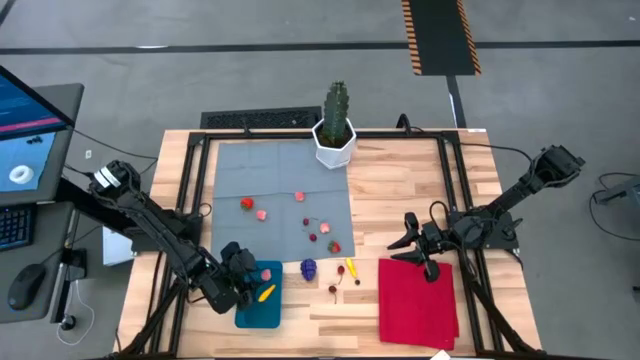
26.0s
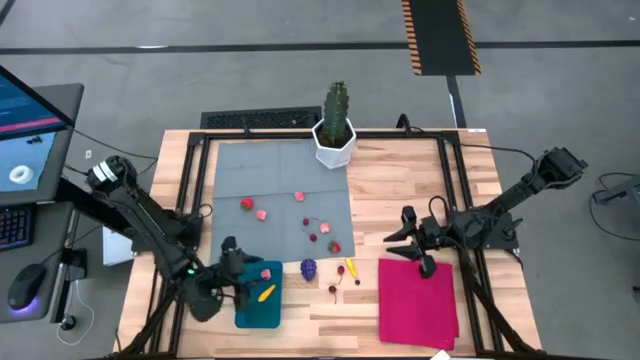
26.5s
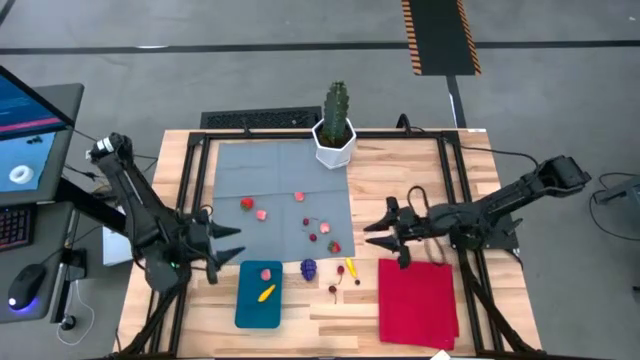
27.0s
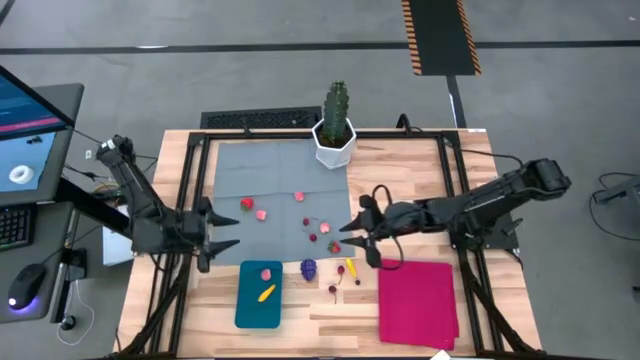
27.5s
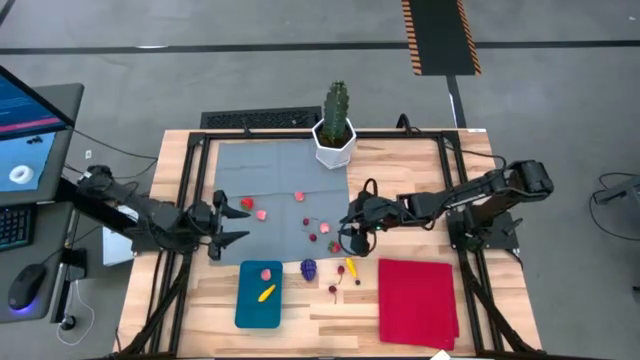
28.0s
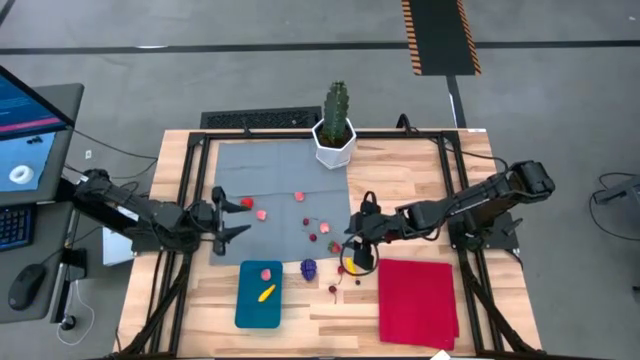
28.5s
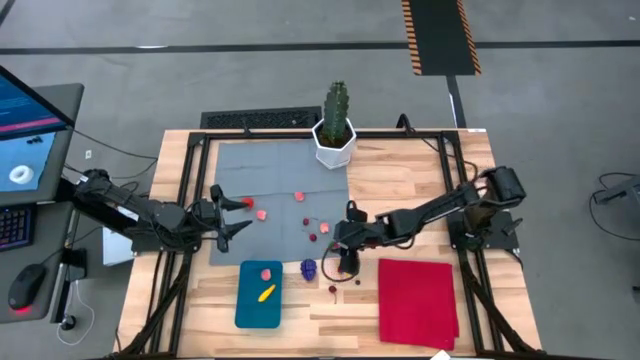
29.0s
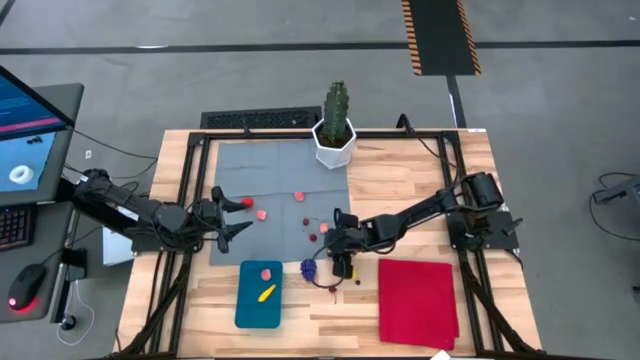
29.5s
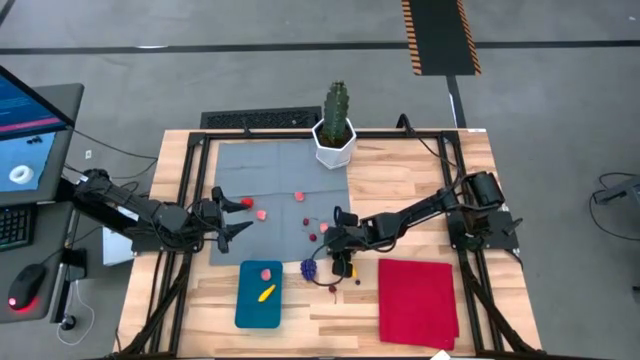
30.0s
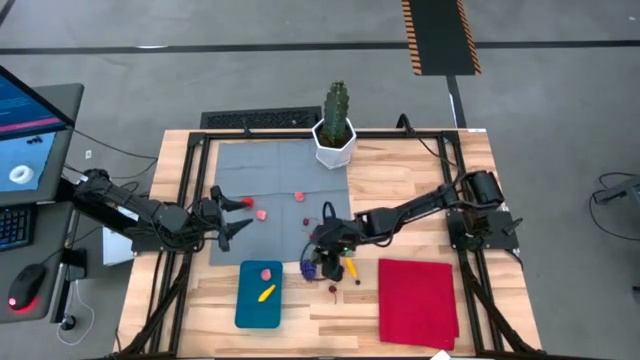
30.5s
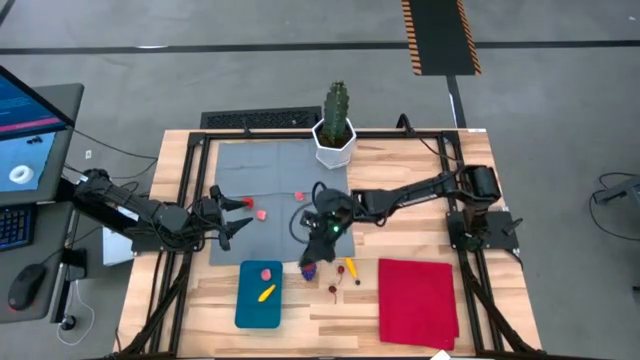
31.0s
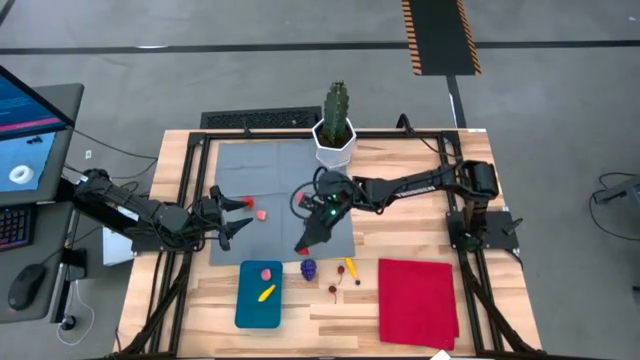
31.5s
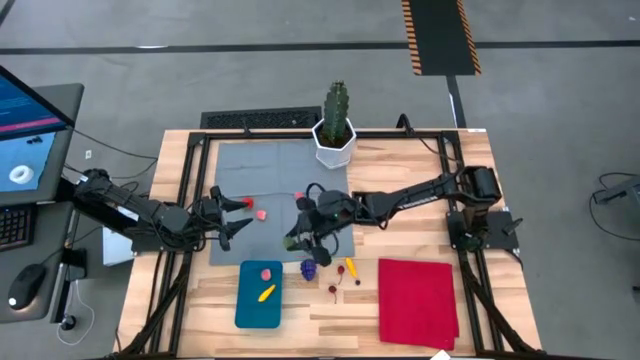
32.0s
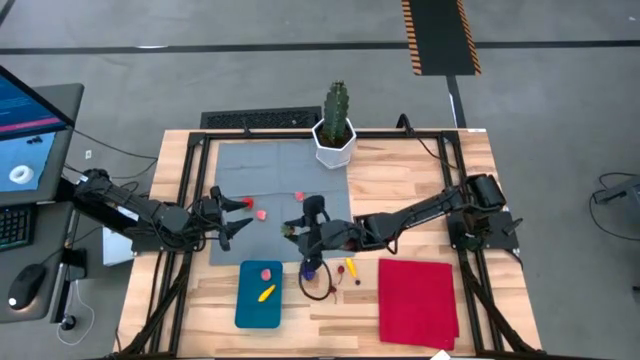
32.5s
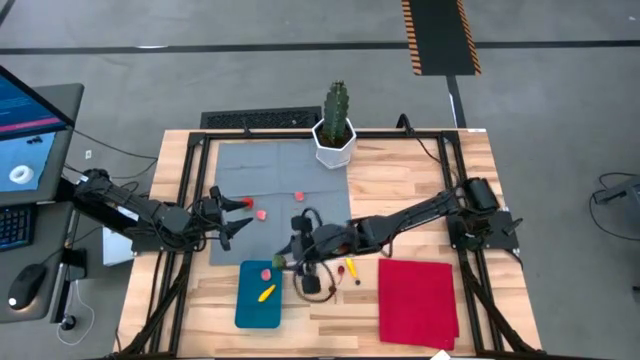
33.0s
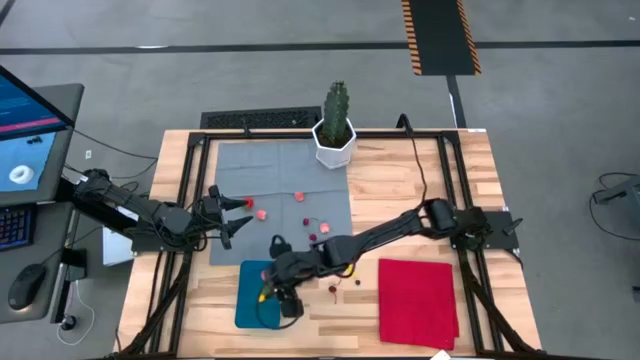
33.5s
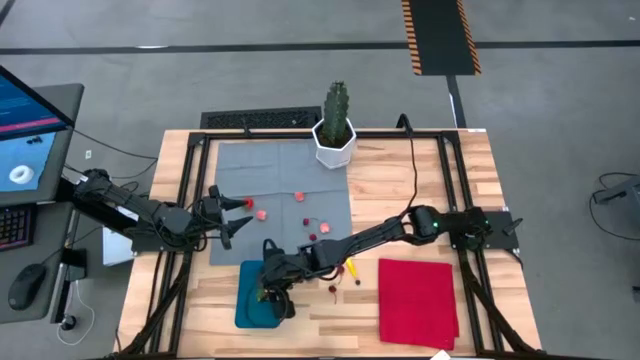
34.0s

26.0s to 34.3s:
Task: Pick and placing Produce into tupperware
Put the strawberry into the blue bin

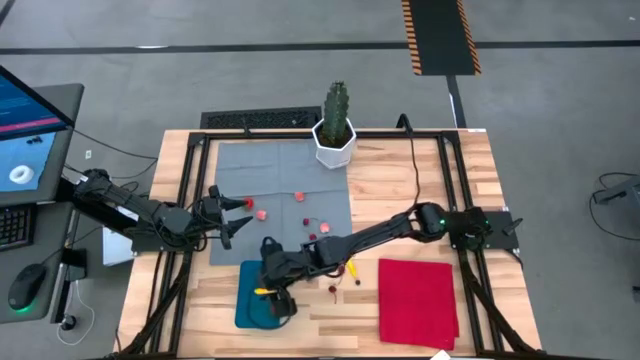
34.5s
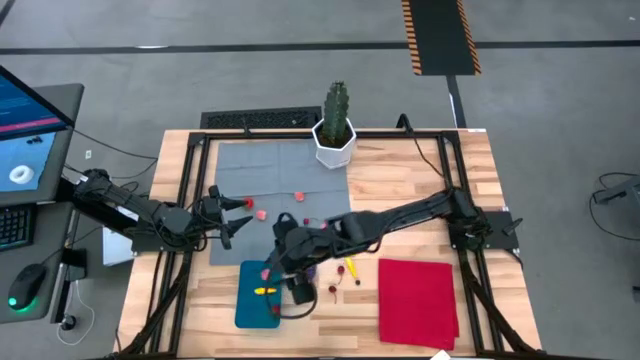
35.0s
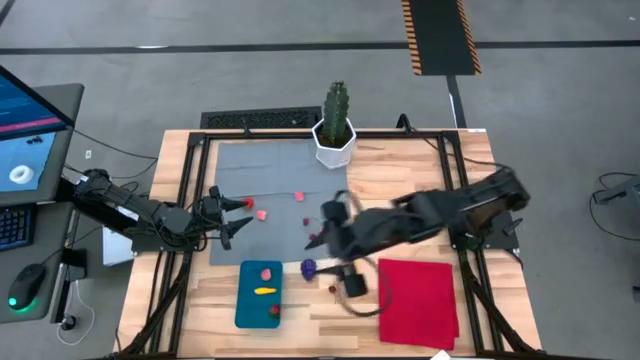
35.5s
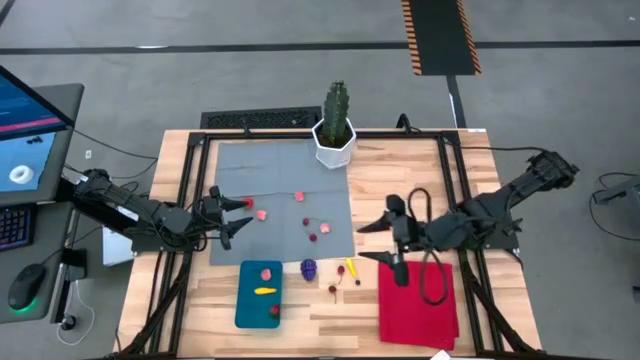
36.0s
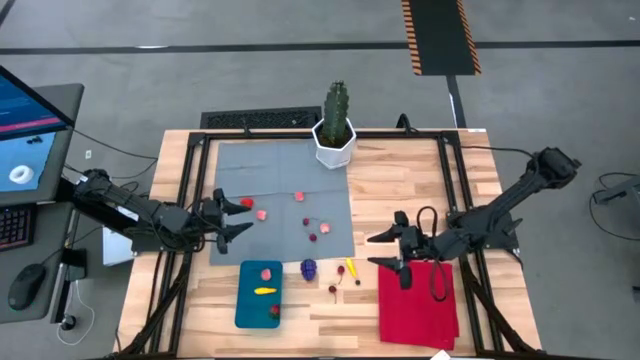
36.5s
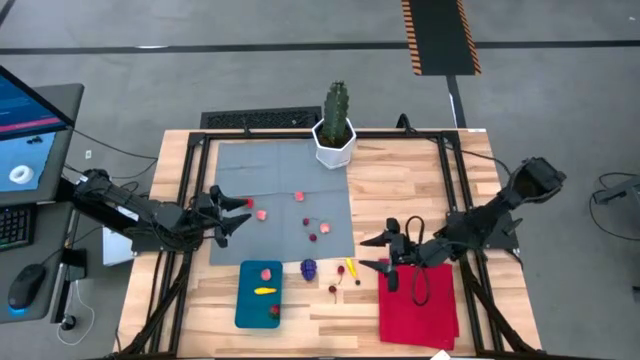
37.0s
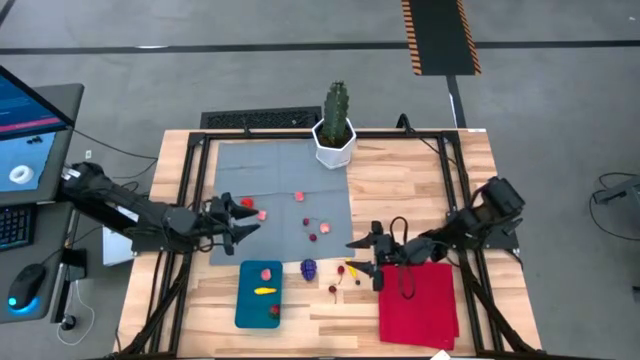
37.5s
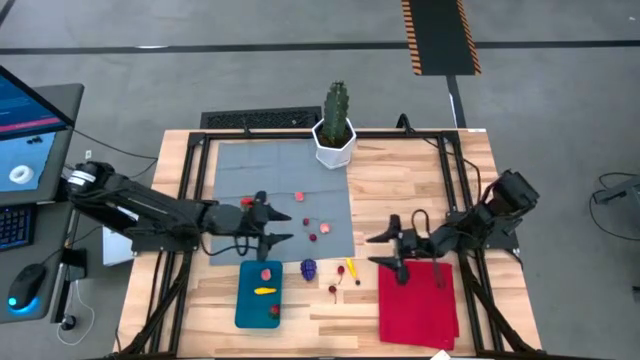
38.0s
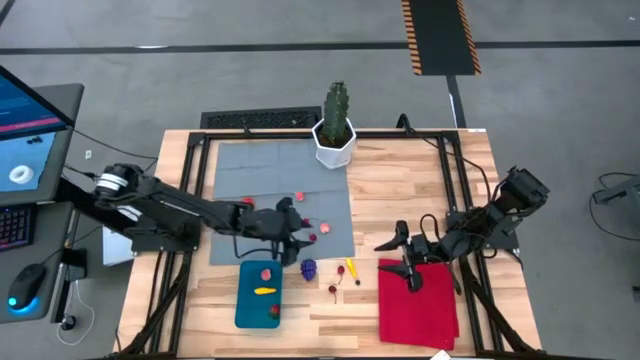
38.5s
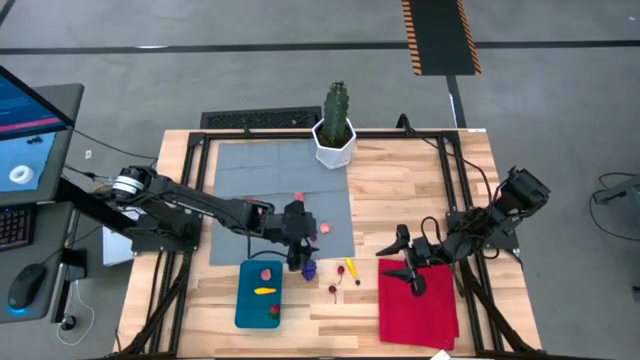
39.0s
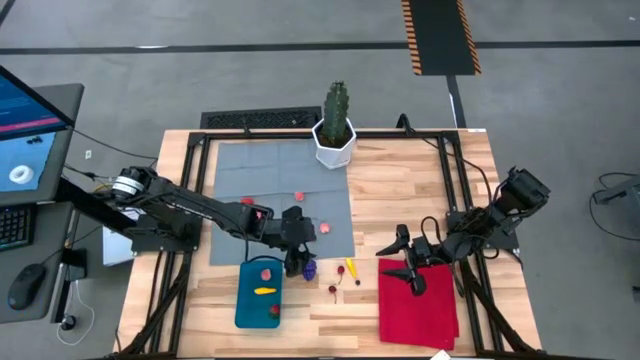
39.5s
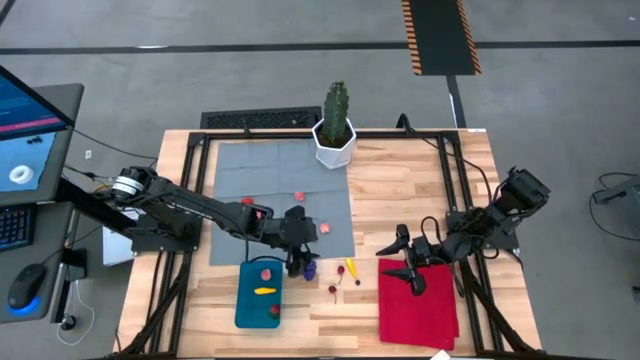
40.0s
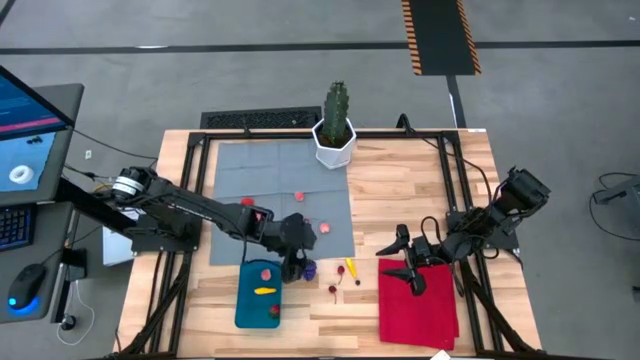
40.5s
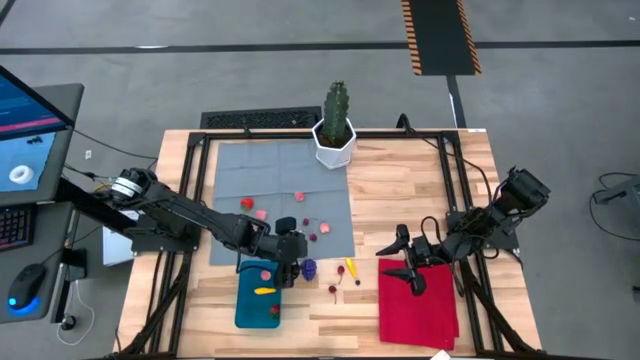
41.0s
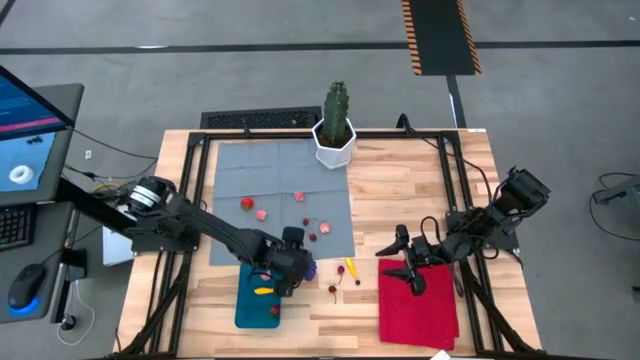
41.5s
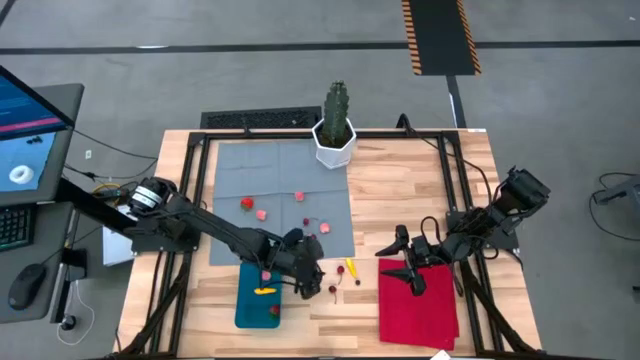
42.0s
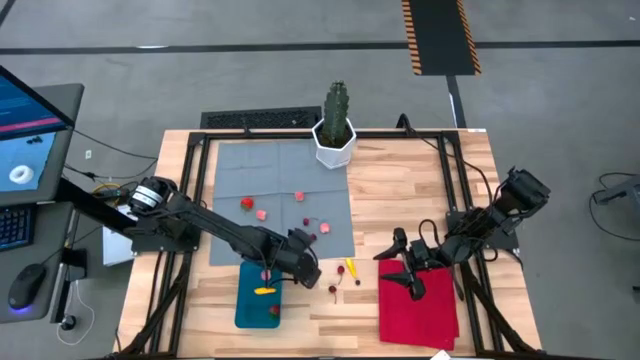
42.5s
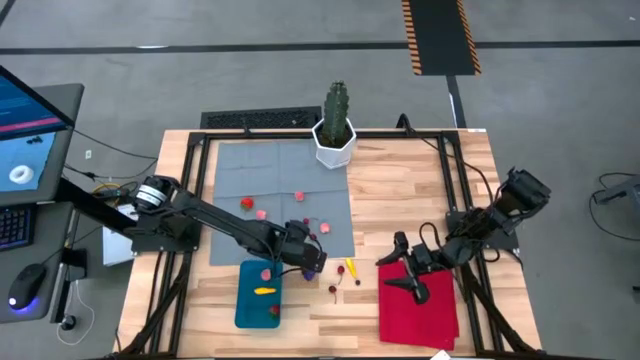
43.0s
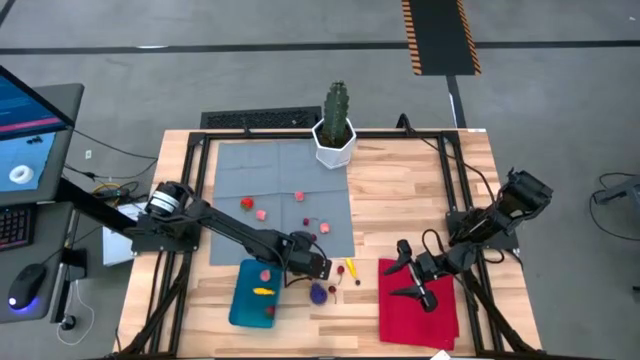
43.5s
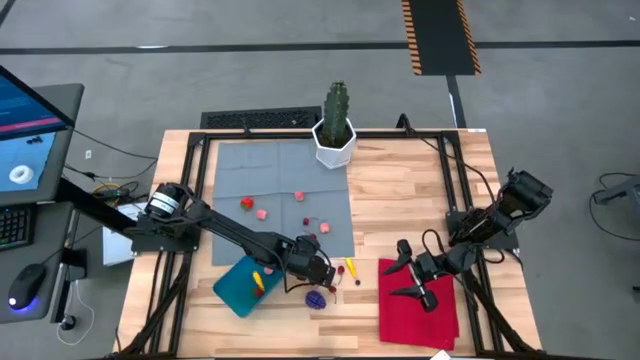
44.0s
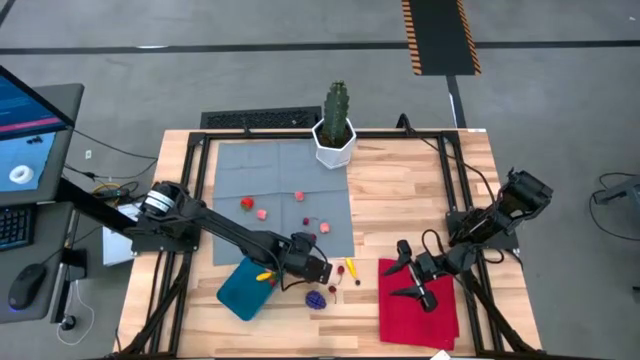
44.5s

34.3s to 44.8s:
Put the grapes into the blue bin

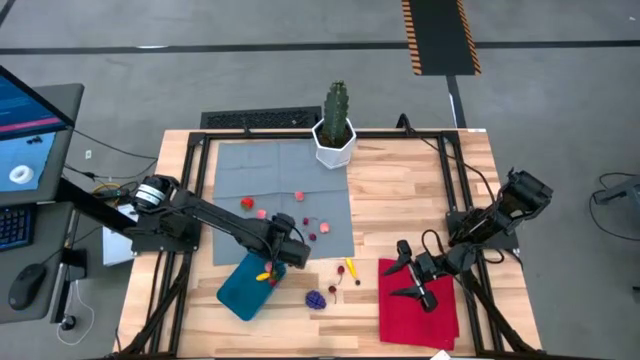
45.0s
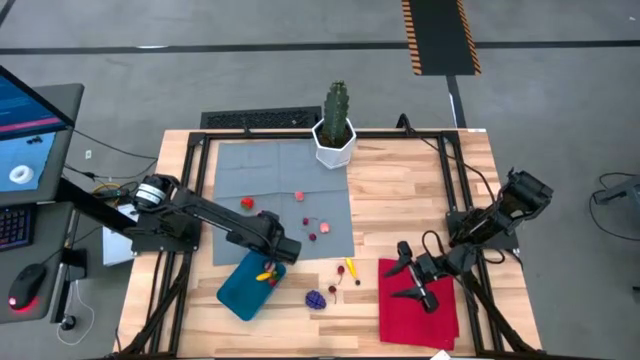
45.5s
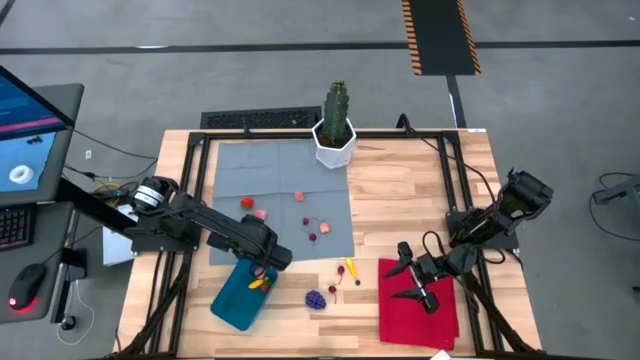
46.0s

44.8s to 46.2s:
Adjust the blue bin
